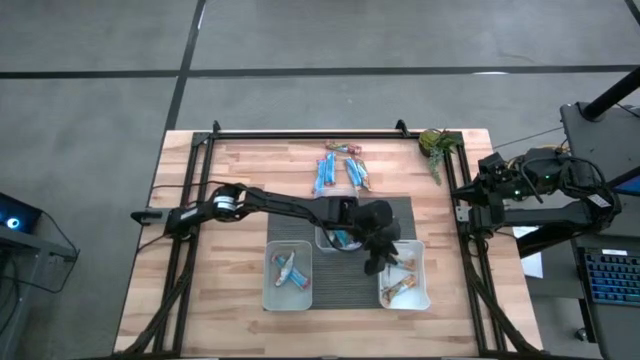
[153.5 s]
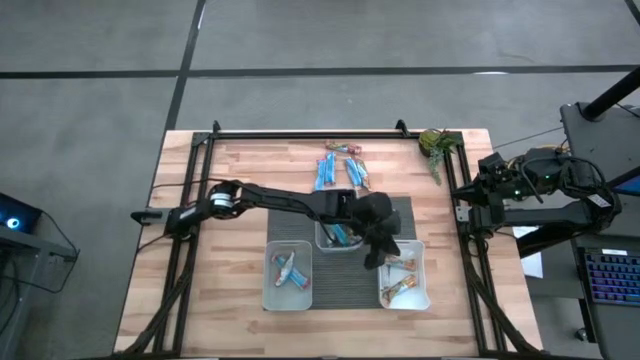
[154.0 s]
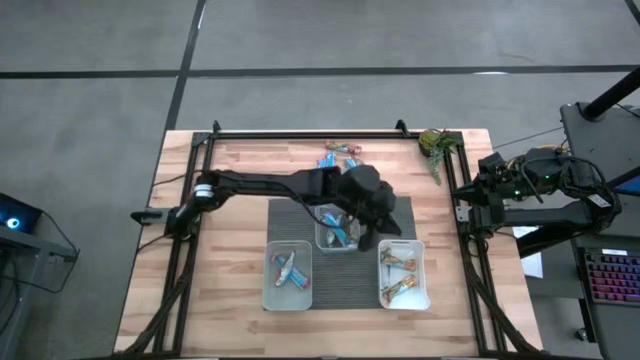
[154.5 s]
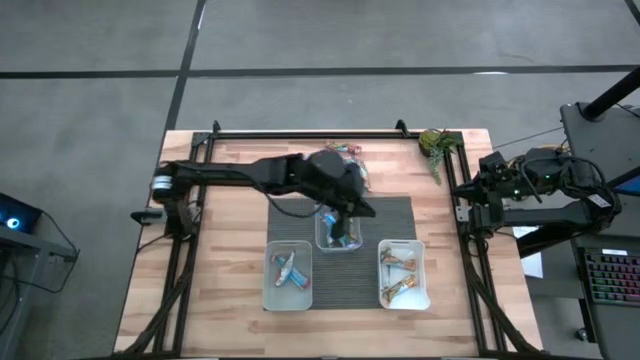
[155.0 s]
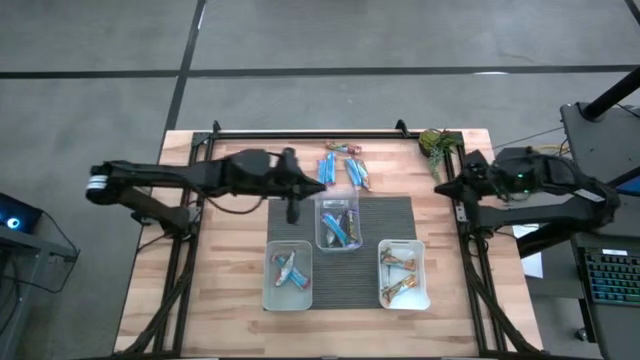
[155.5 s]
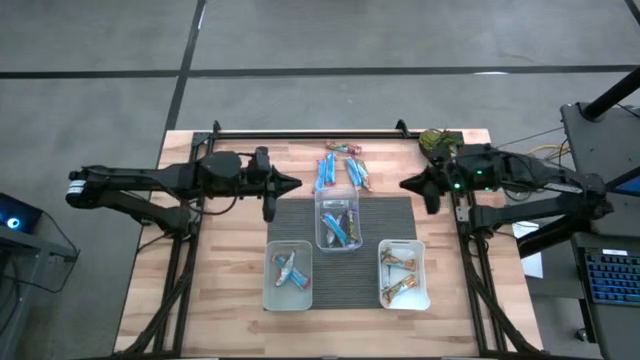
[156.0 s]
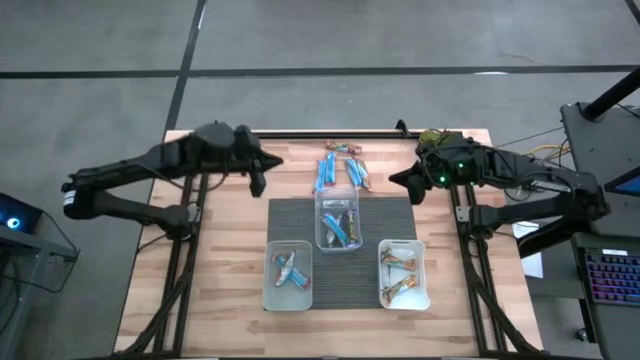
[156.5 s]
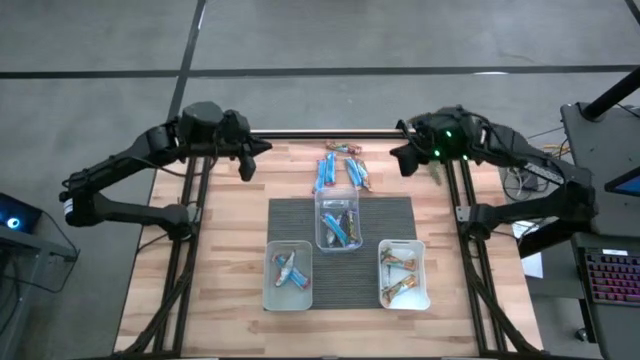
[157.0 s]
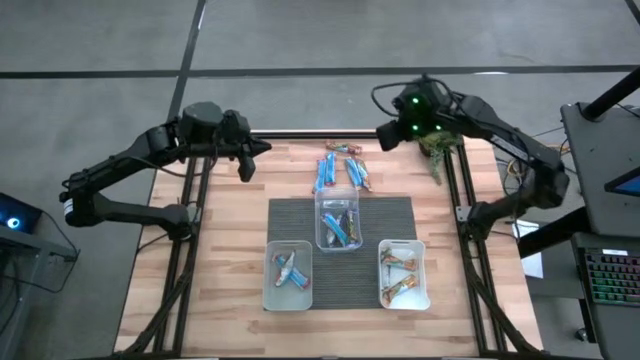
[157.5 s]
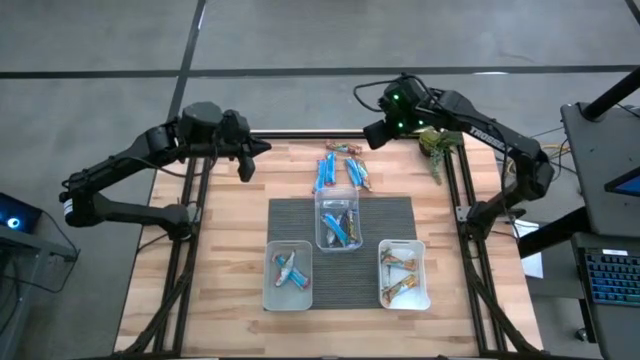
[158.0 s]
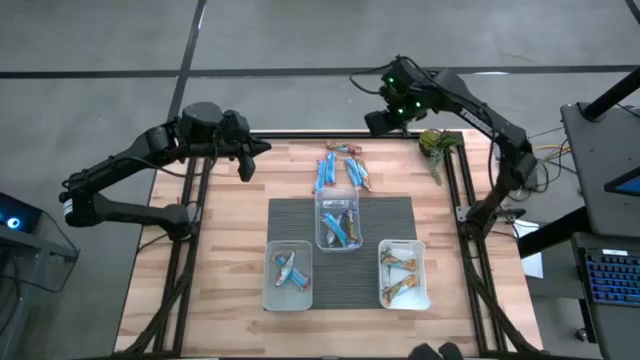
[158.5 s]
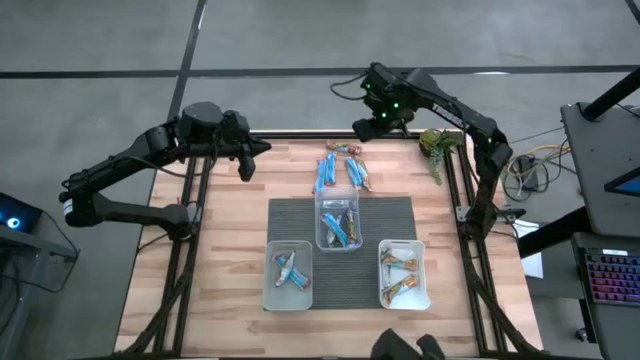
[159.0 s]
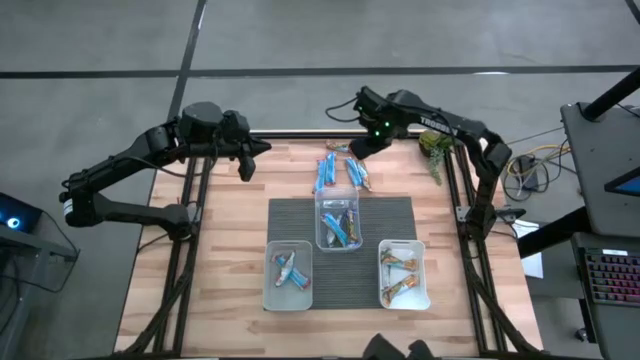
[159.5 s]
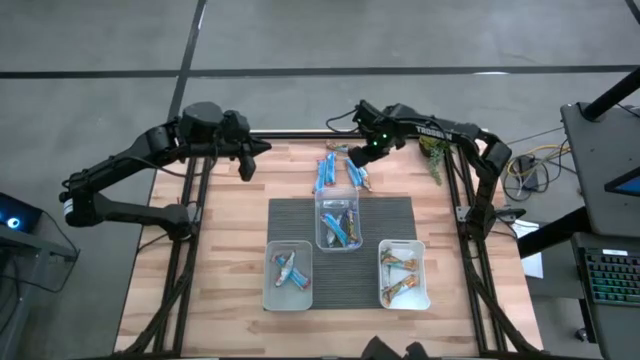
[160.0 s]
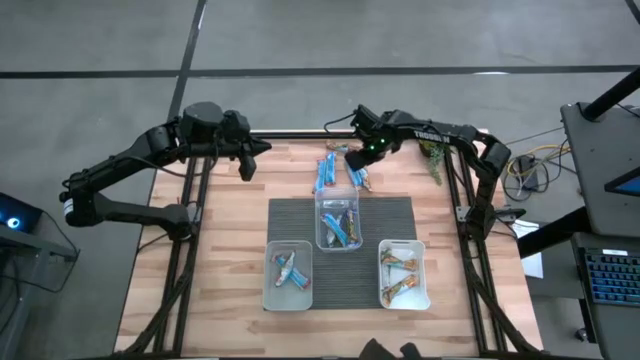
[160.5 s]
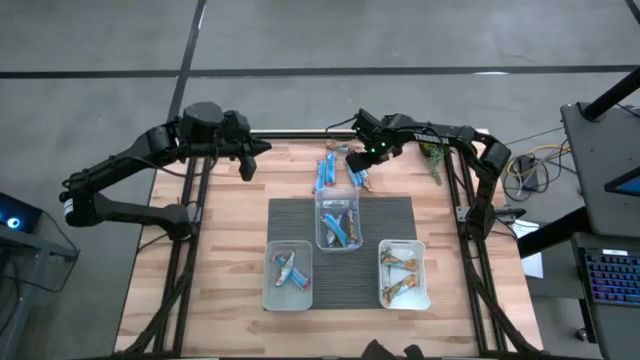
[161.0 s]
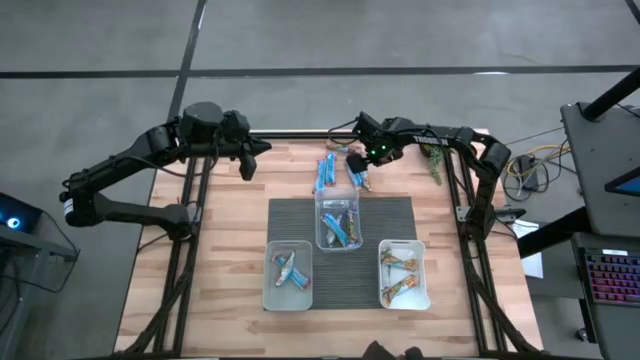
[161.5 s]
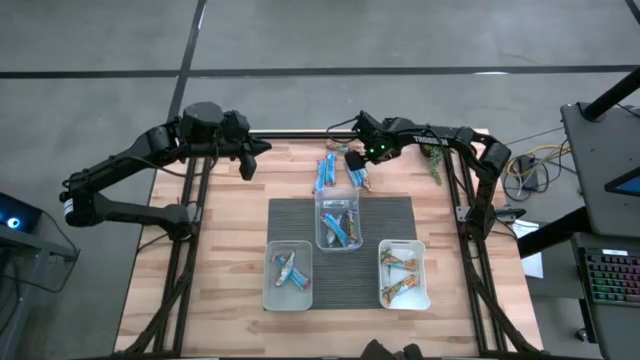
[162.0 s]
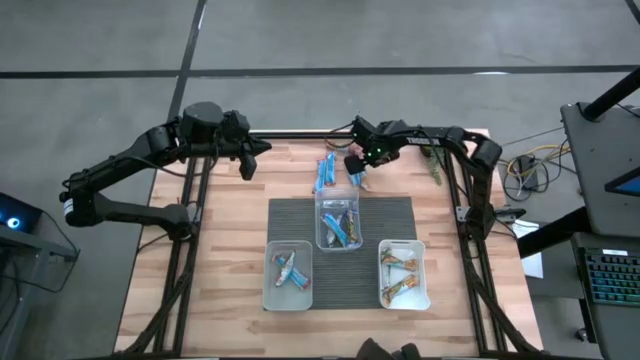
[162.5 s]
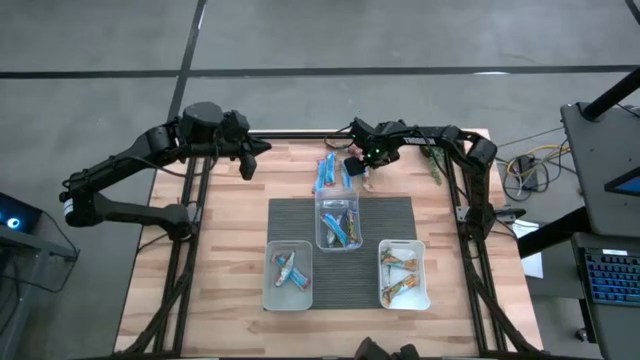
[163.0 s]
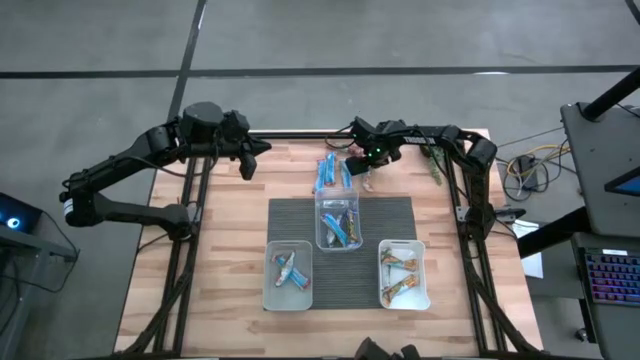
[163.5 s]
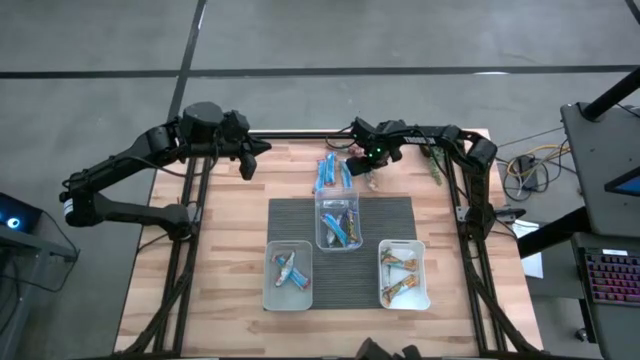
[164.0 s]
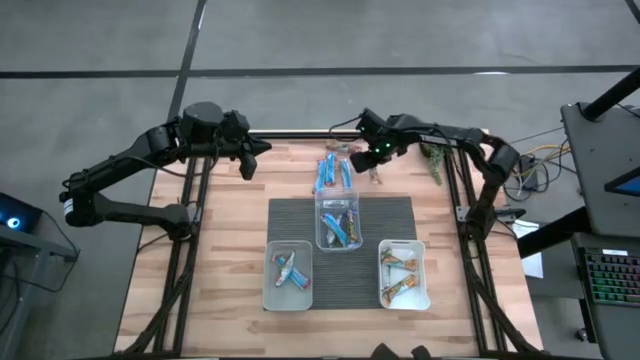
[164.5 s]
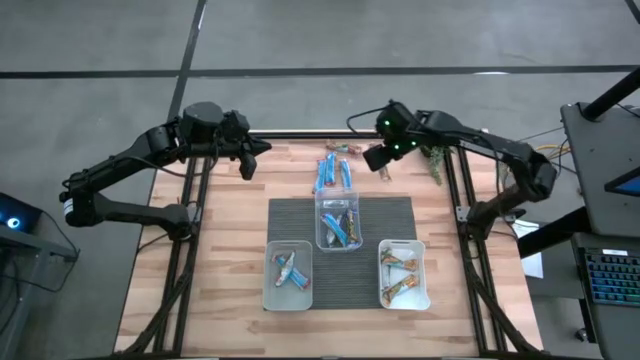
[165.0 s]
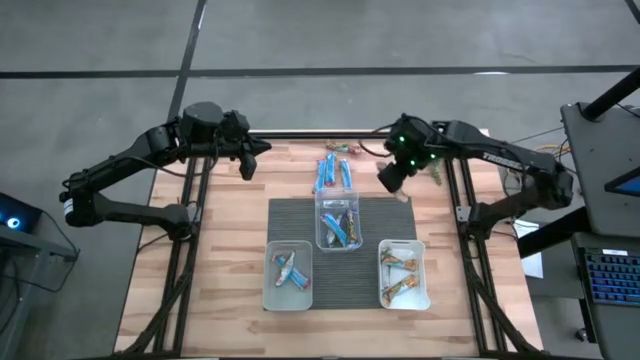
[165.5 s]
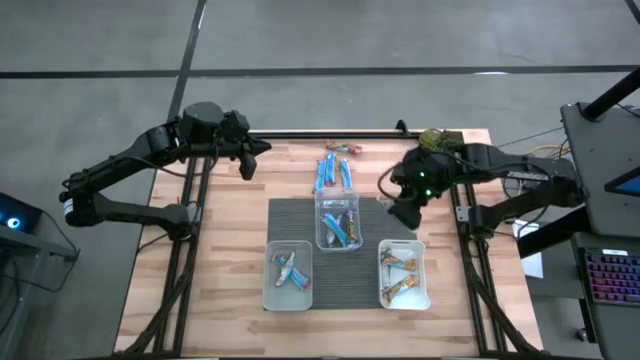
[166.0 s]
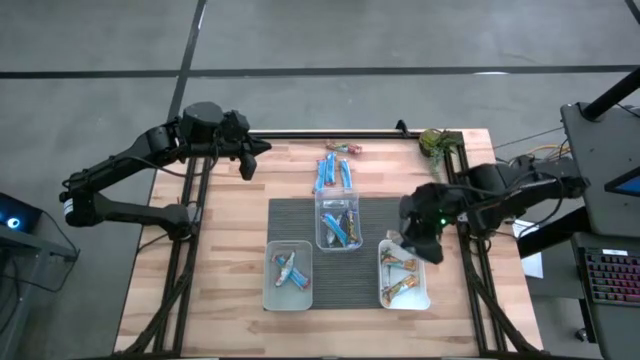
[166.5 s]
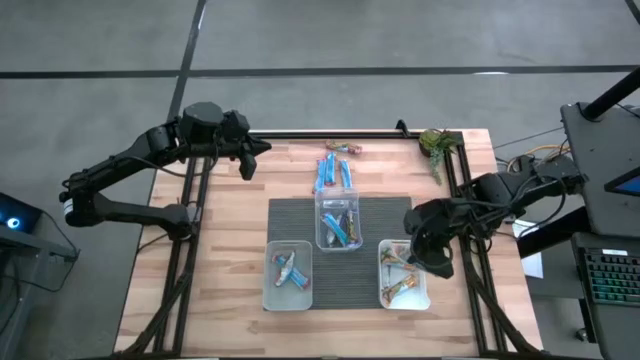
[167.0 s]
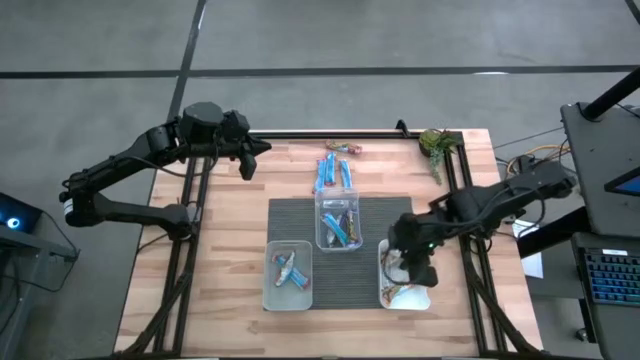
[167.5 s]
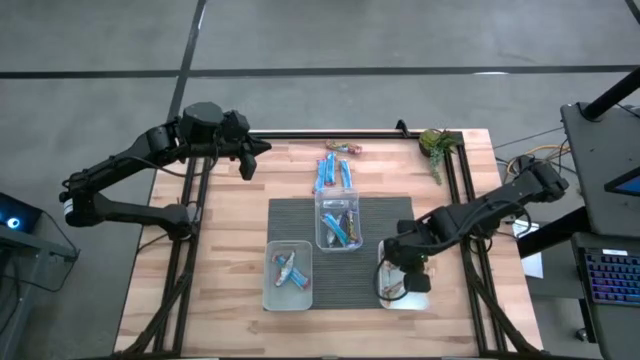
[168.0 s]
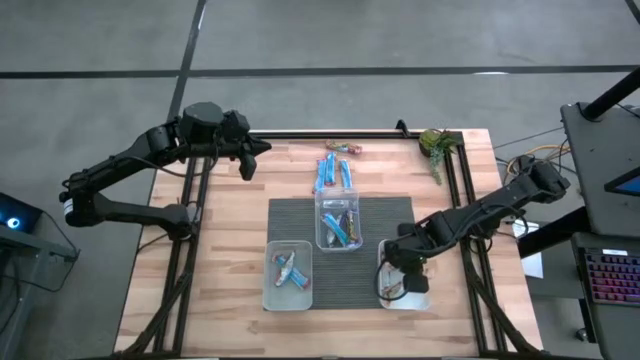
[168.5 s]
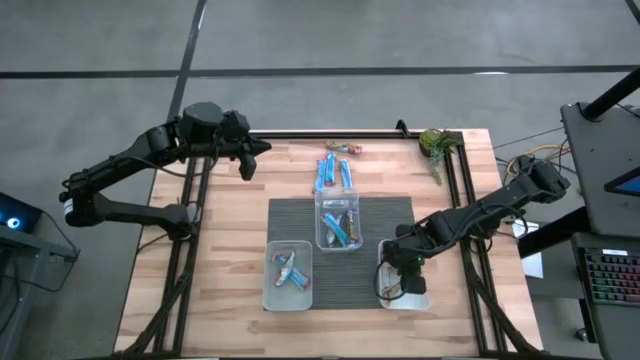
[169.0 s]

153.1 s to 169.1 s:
Task: Pick and place Granola Bars by type
Put the orange granola bar into the white bin

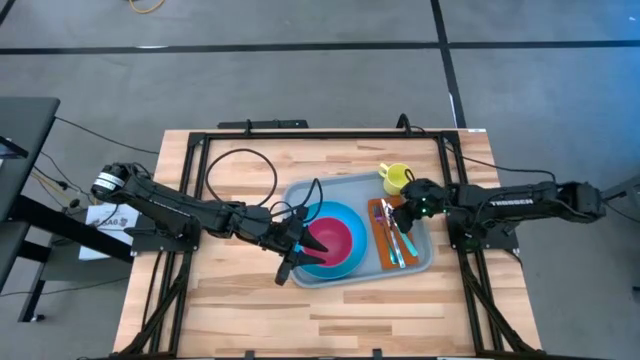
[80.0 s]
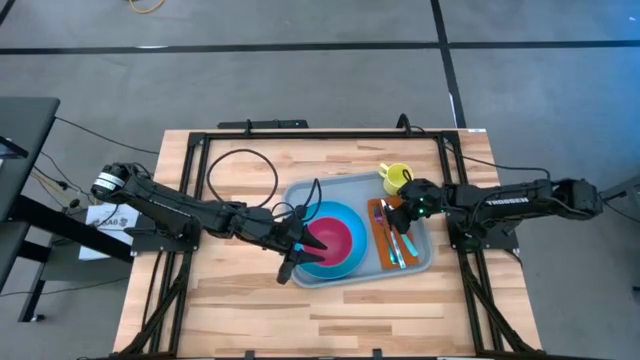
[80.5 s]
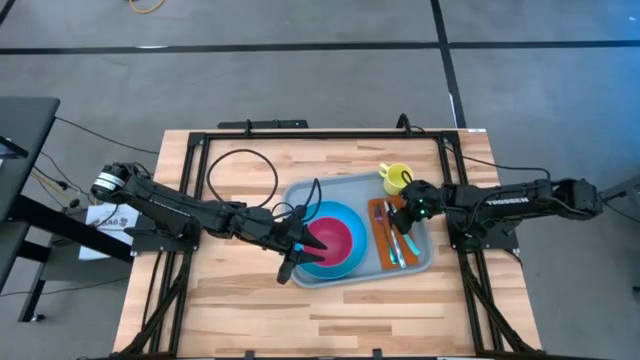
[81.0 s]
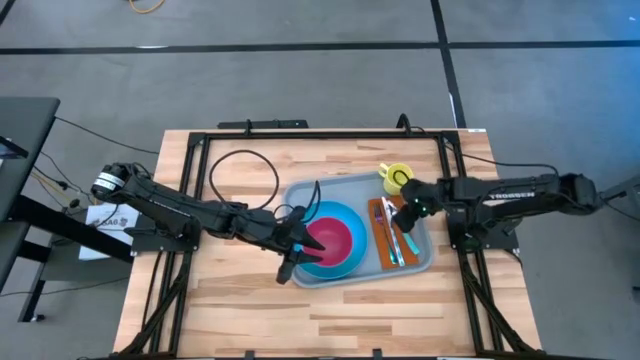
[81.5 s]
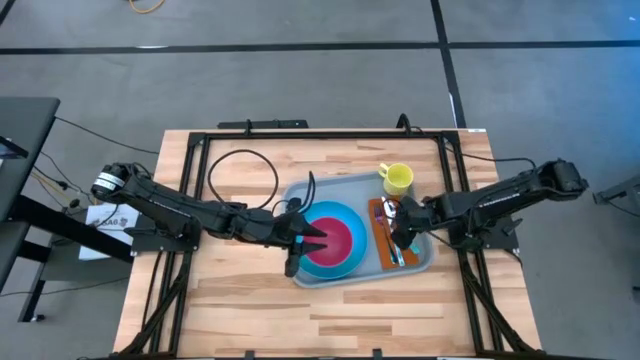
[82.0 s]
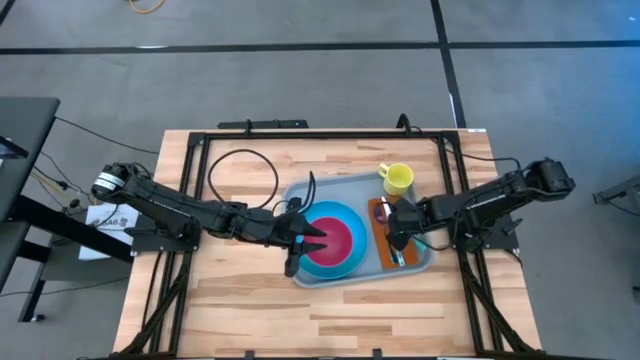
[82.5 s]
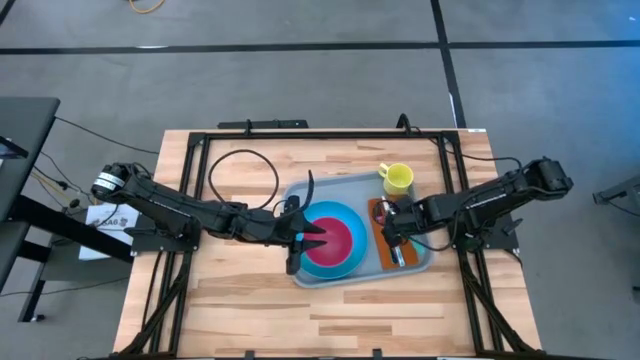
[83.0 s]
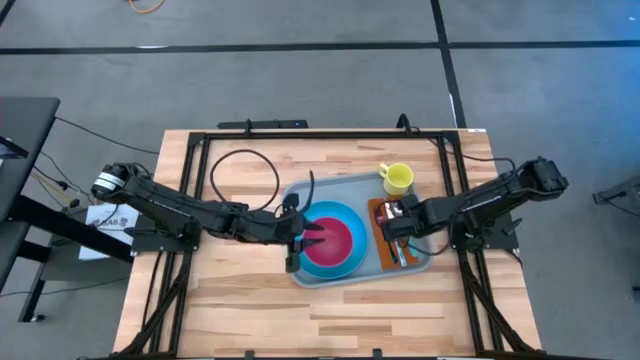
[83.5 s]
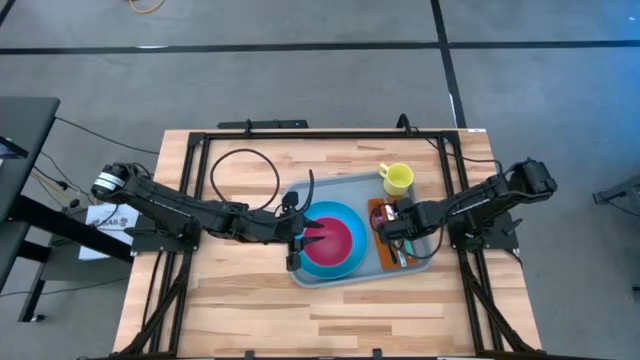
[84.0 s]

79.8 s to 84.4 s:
Task: Set up tray
Adjust the green spoon on the brown napkin

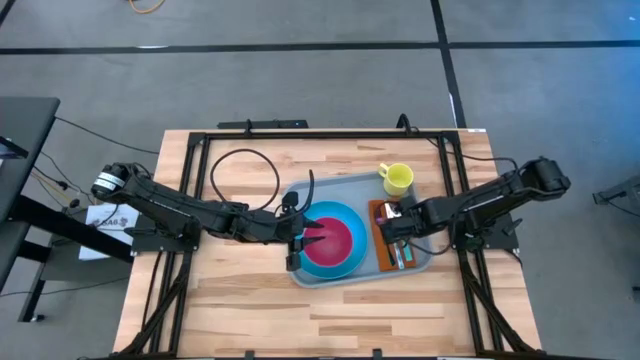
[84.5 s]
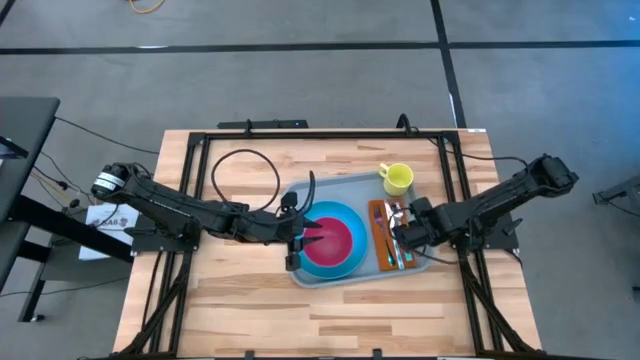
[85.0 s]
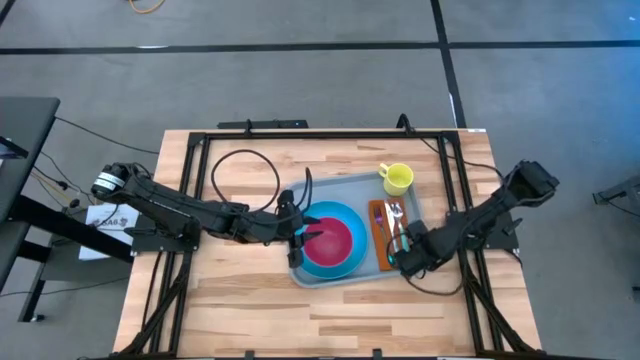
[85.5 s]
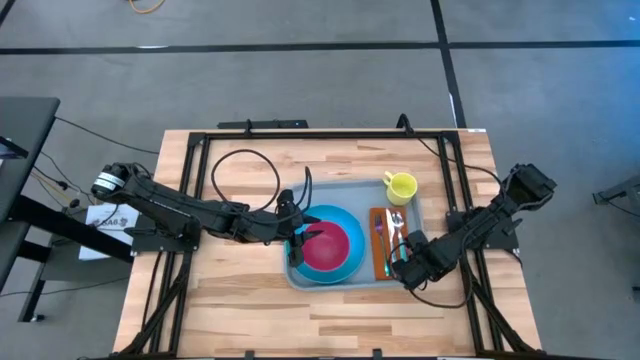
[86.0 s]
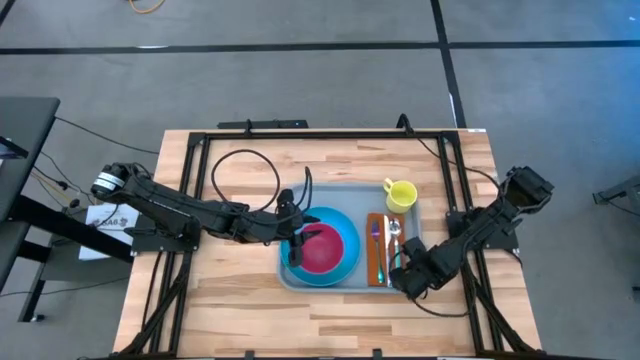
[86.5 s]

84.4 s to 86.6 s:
Adjust the gray serving tray on the table

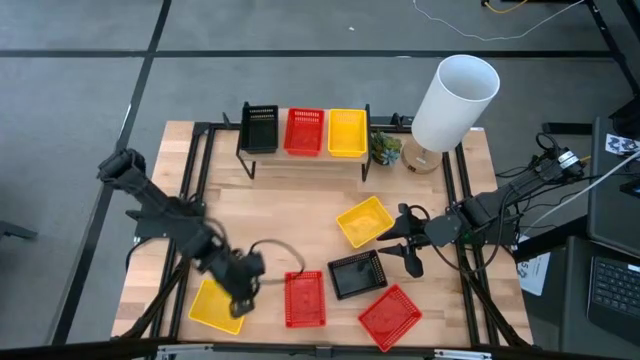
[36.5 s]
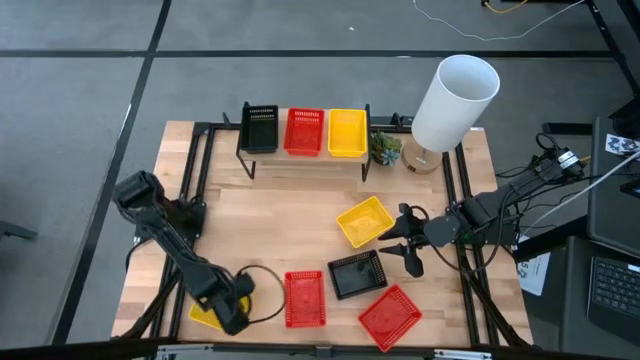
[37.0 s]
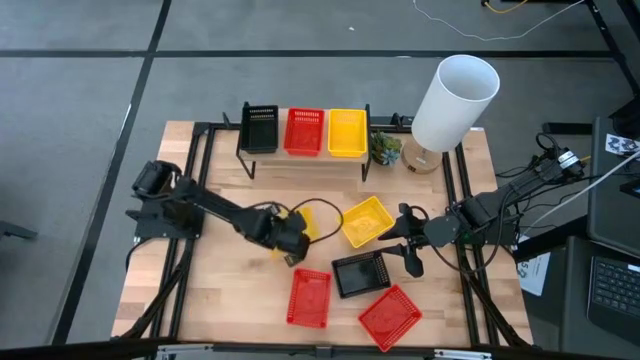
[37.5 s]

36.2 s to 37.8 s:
Task: Stack baskets on shelf by color
Move the bottom yellow bin to the center of the table
